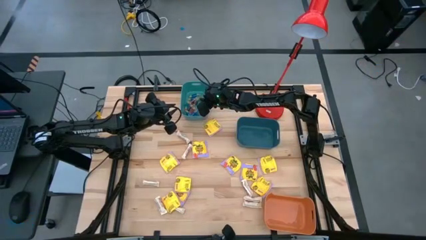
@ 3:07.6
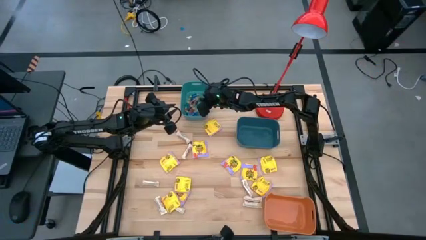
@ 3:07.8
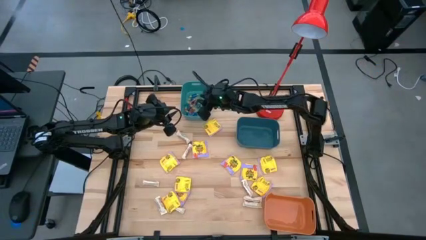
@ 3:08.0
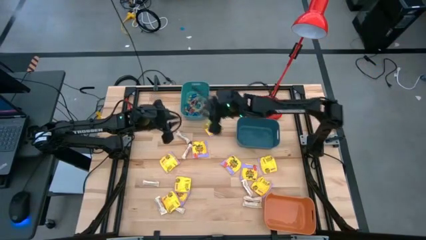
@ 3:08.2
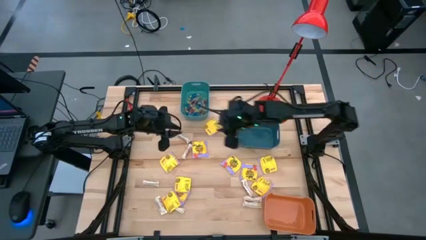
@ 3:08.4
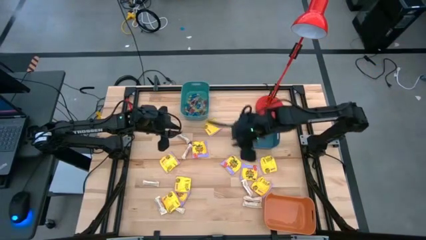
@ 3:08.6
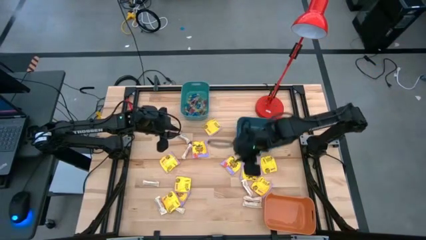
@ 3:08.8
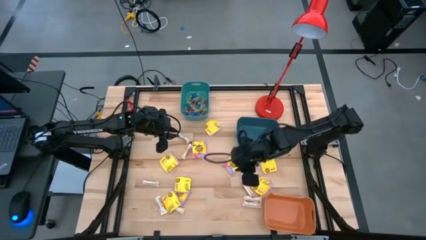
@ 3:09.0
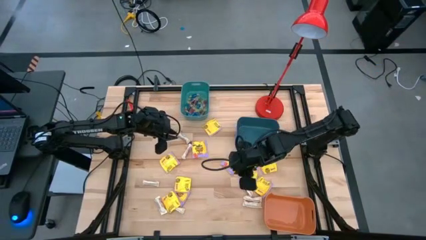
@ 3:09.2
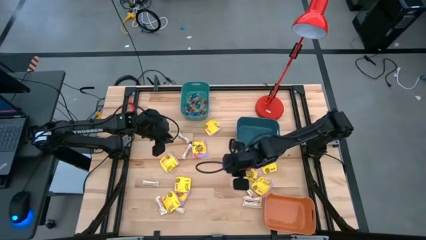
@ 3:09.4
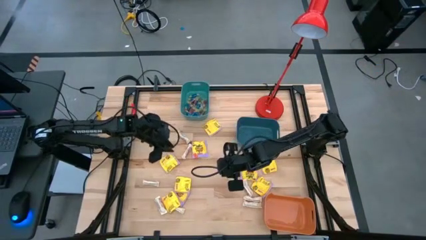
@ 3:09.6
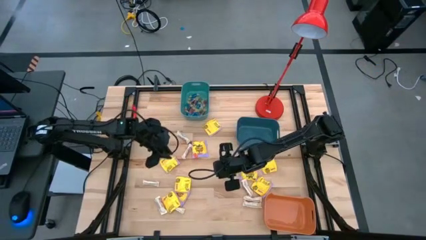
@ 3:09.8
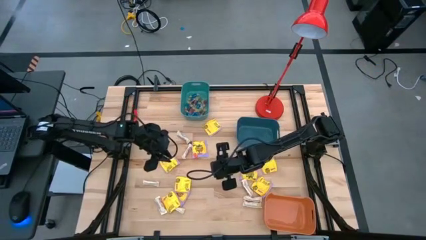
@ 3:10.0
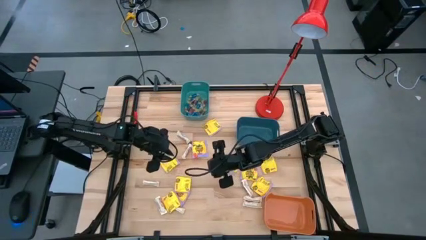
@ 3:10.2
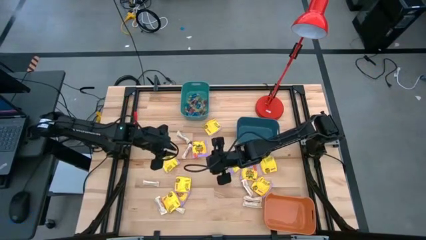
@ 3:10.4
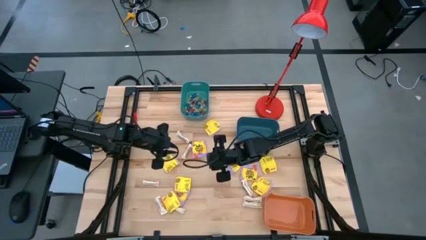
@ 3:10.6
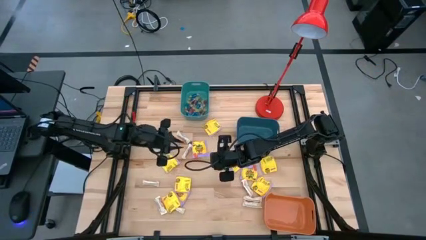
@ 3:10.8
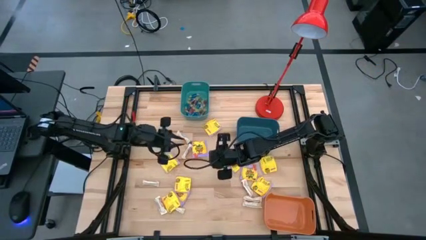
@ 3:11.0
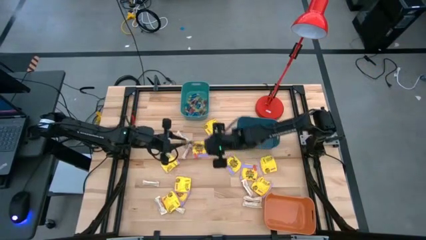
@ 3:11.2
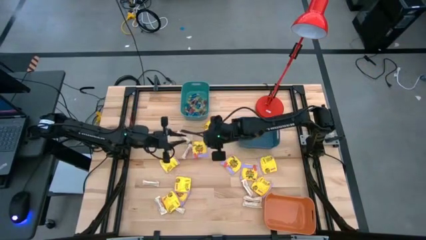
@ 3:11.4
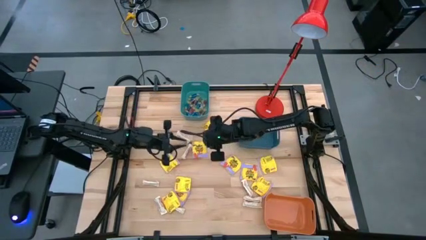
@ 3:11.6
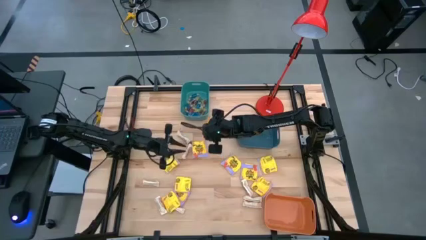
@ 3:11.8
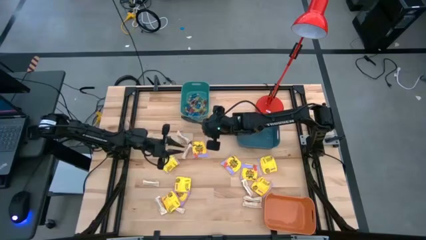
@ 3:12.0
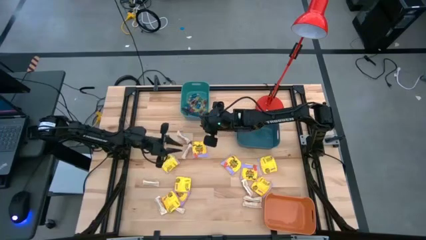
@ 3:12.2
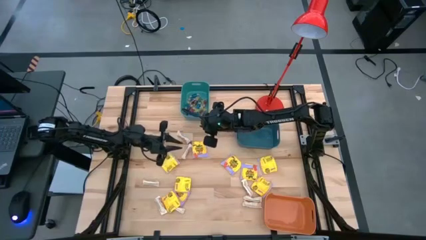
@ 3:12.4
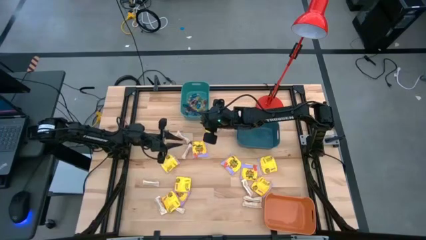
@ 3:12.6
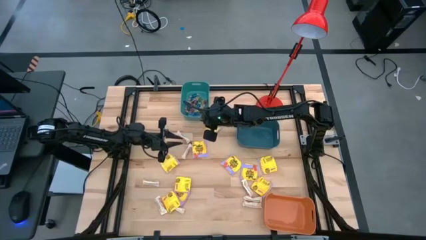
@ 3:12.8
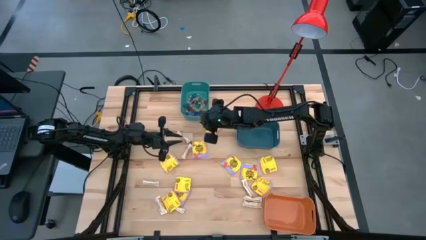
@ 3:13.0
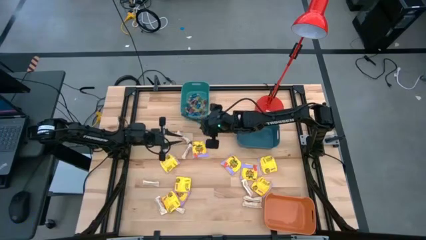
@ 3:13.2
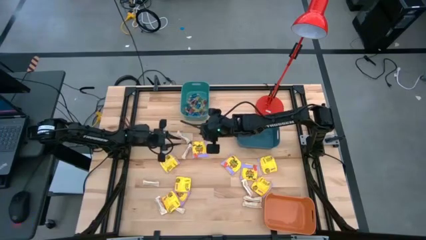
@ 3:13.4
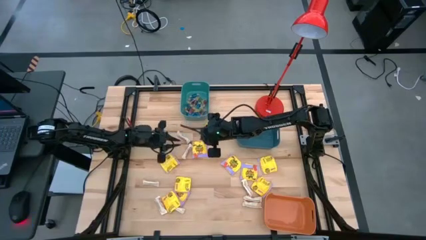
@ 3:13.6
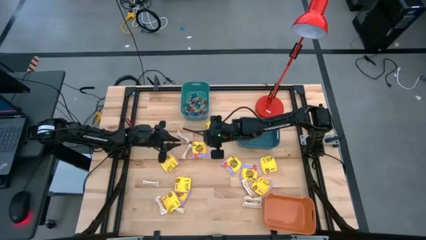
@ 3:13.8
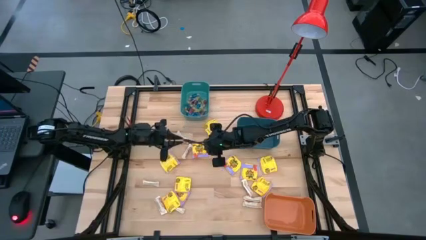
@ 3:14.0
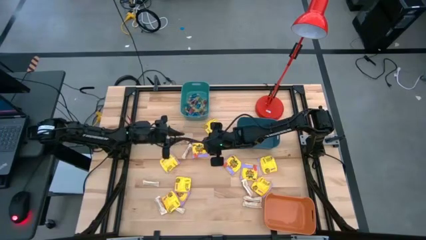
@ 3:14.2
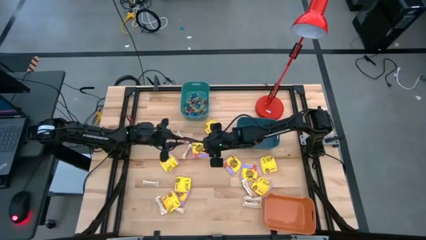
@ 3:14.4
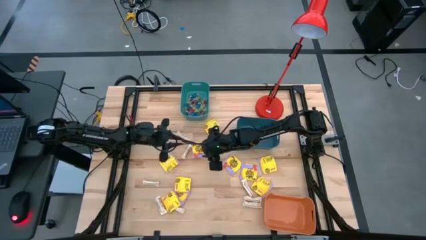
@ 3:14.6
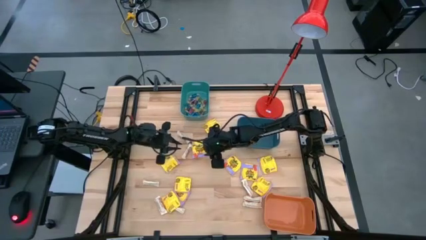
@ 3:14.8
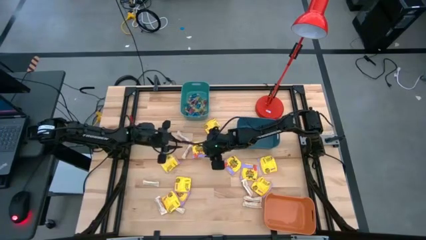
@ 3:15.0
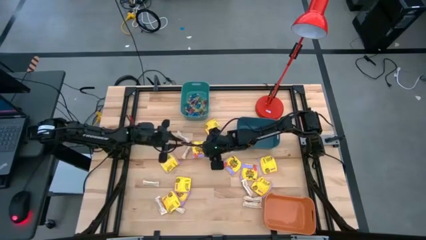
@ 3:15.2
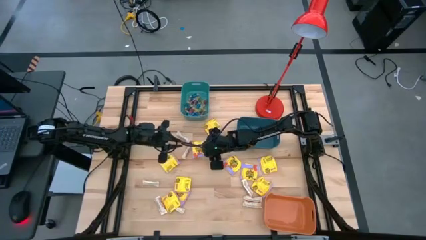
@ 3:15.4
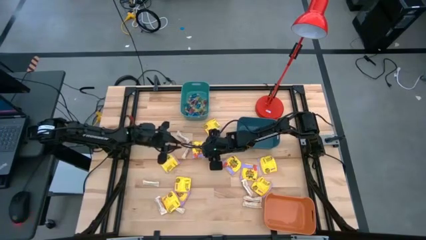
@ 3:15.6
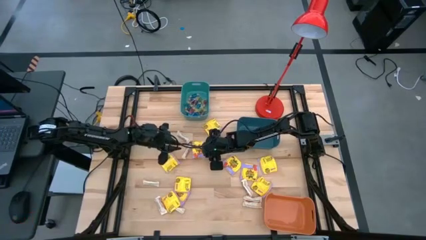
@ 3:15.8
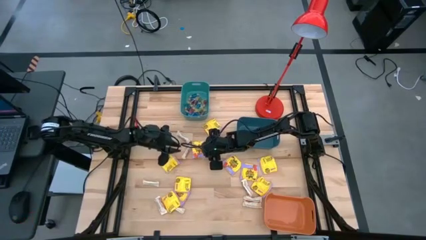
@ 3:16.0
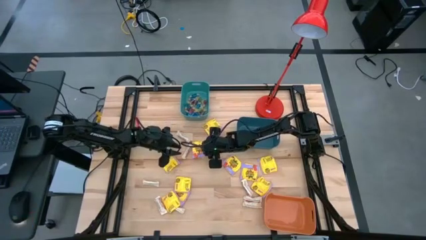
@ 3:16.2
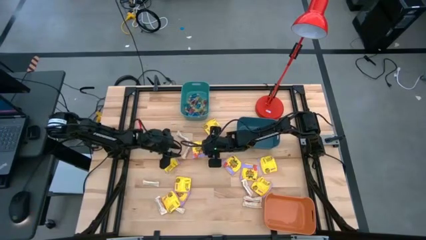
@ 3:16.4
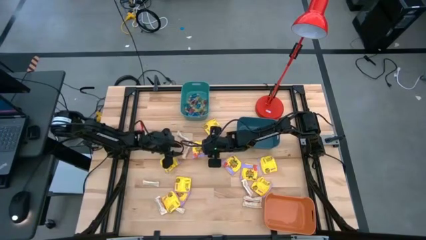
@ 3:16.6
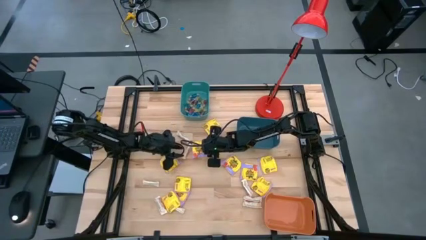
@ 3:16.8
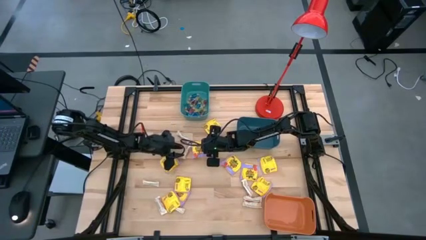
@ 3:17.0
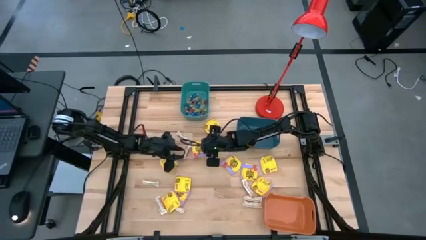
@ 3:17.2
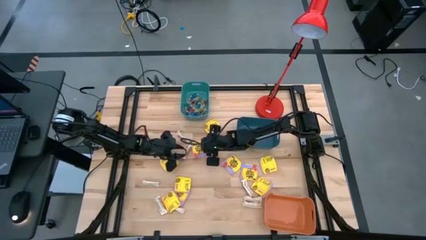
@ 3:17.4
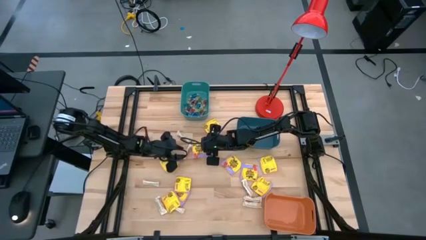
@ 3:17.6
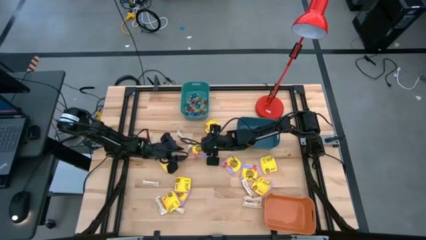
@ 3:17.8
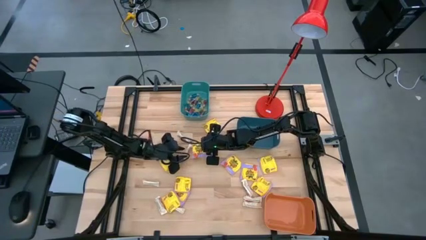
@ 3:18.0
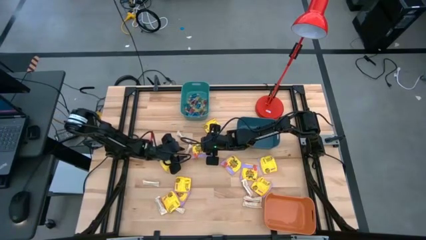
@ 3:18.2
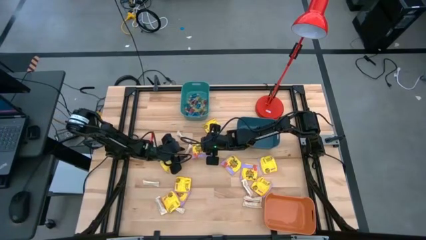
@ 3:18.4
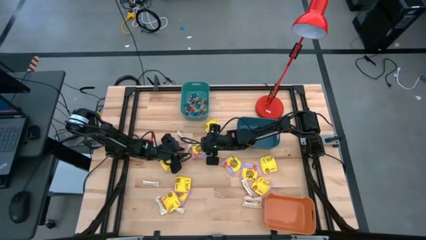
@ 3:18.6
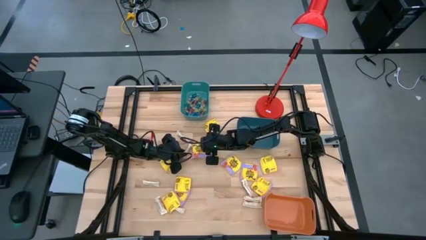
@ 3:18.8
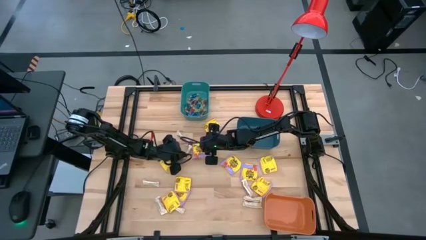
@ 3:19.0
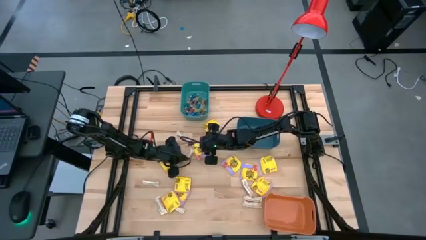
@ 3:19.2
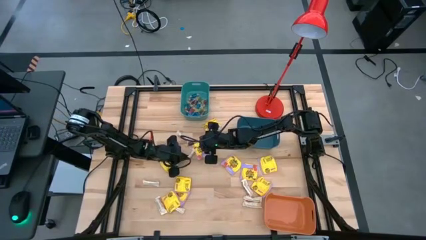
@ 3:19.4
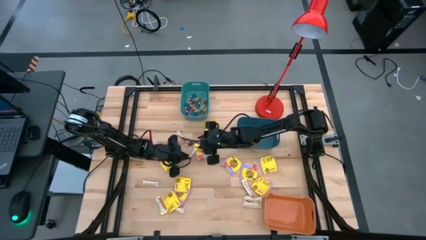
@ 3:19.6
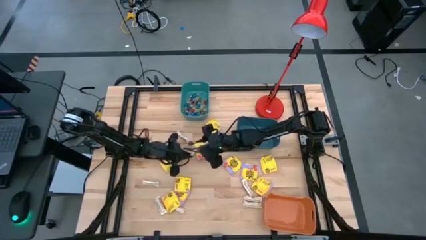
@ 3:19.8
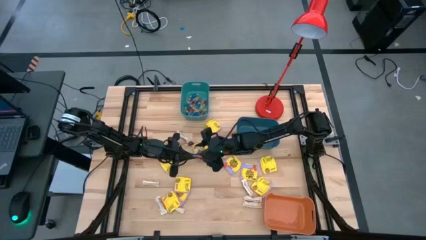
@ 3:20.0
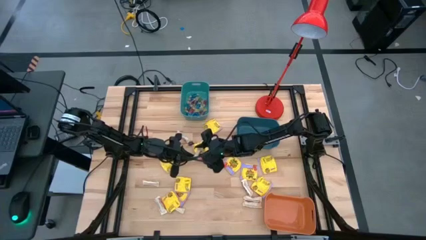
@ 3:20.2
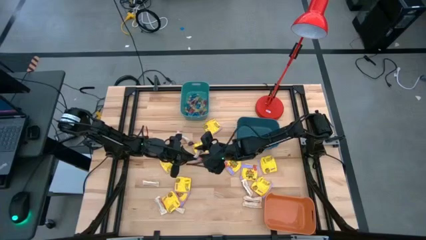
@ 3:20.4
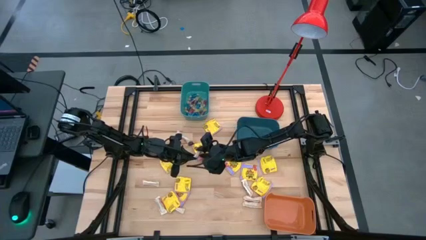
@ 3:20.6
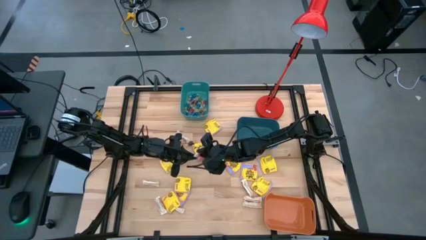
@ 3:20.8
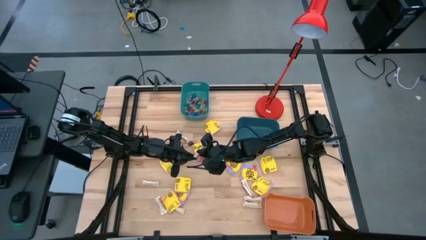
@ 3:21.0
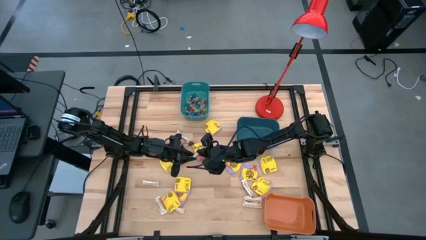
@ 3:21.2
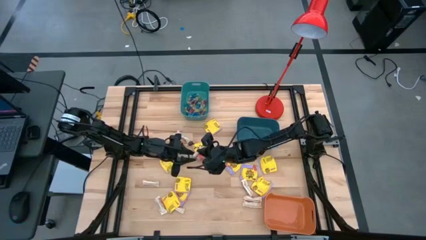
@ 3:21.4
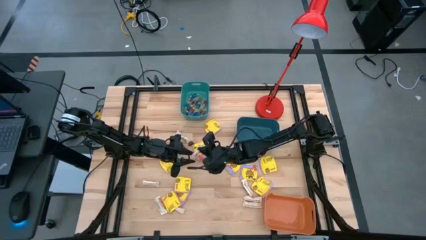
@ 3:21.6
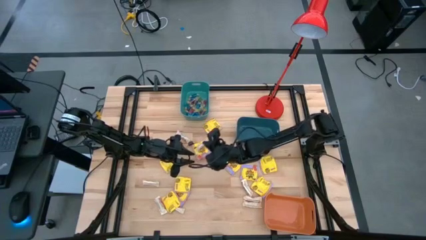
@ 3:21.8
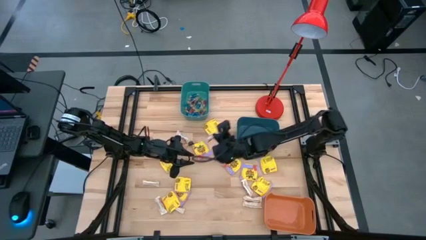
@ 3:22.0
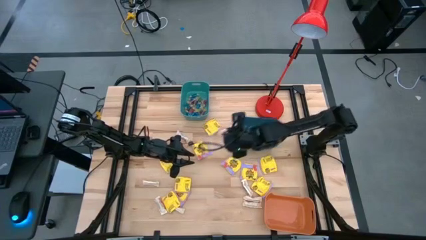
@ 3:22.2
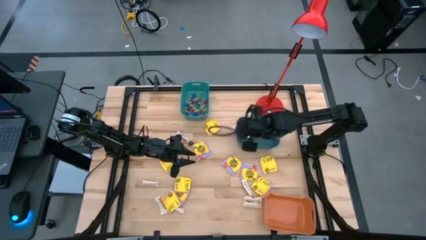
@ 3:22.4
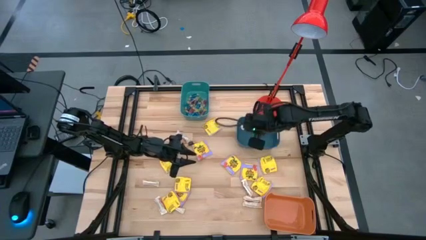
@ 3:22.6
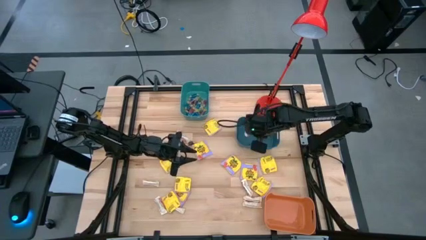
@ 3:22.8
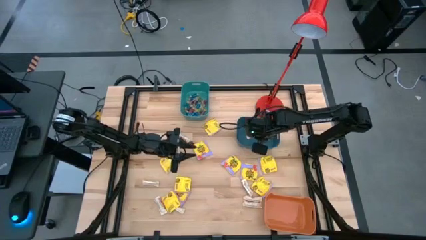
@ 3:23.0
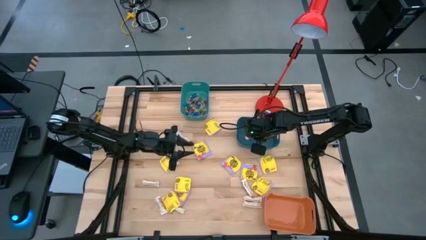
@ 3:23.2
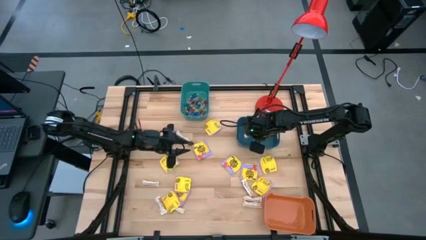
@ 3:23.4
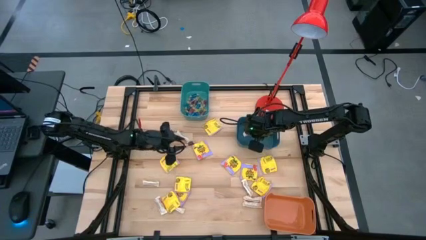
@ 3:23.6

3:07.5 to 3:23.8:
Task: Sort candy
Put the white chocolate bar into the blue bin
